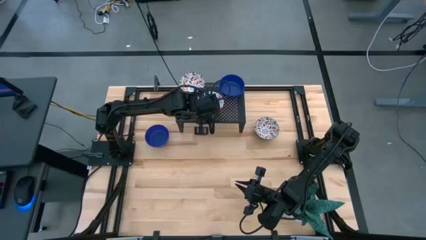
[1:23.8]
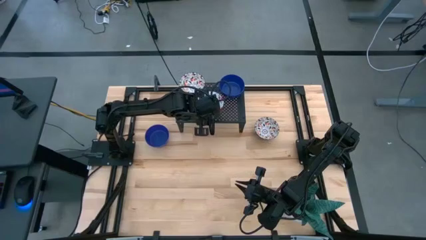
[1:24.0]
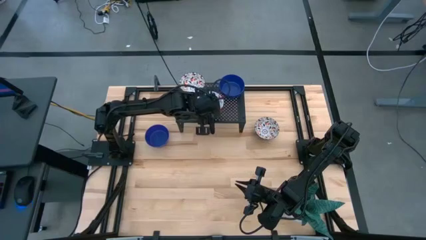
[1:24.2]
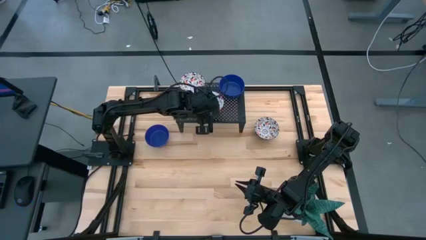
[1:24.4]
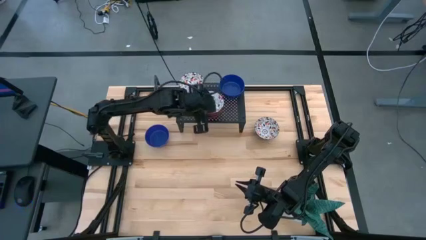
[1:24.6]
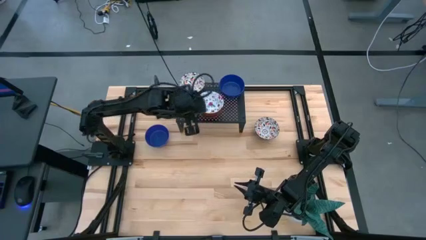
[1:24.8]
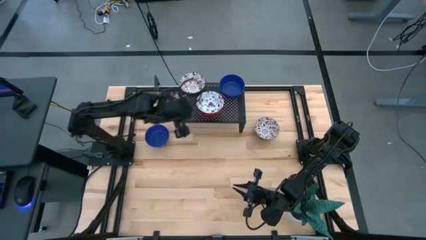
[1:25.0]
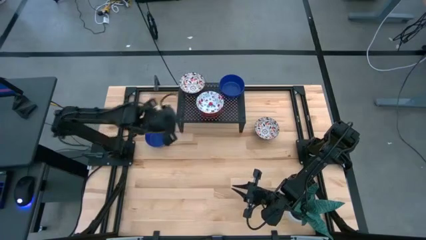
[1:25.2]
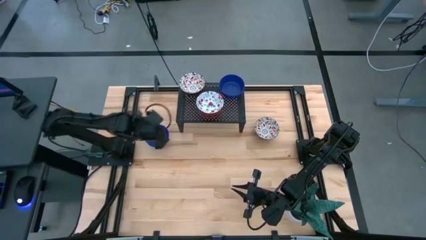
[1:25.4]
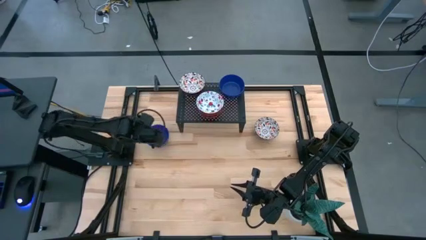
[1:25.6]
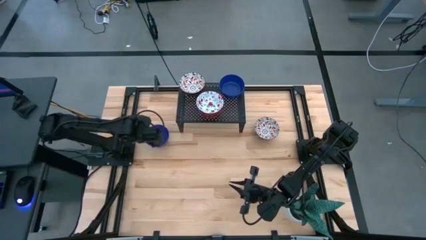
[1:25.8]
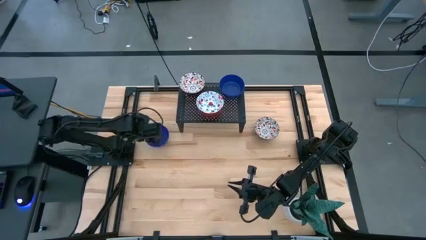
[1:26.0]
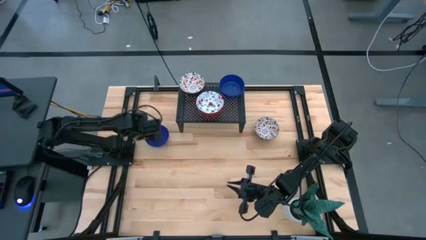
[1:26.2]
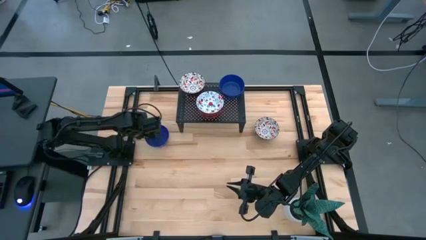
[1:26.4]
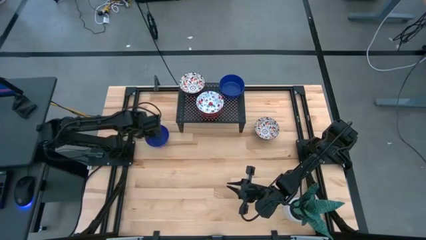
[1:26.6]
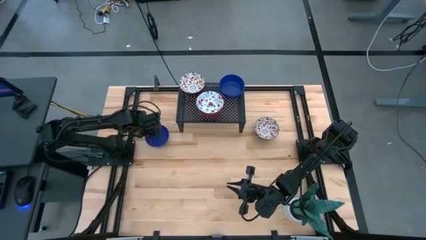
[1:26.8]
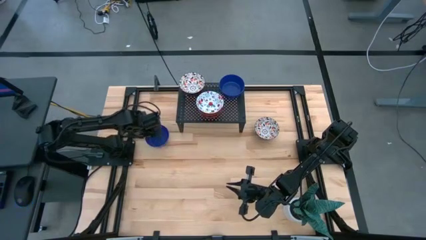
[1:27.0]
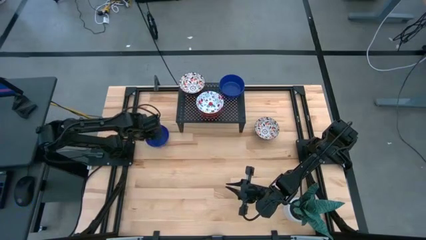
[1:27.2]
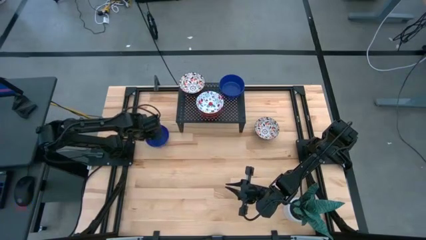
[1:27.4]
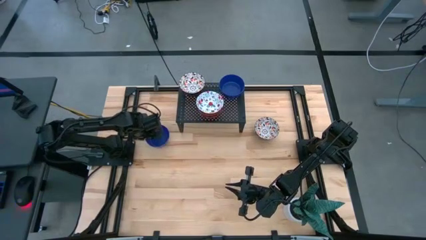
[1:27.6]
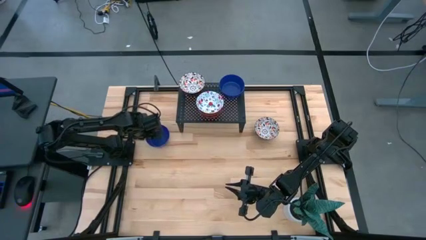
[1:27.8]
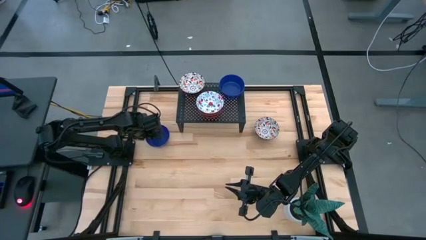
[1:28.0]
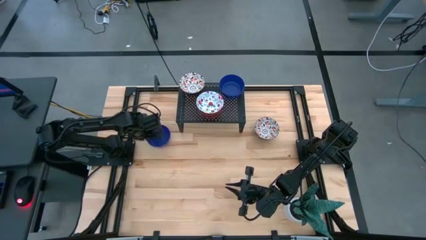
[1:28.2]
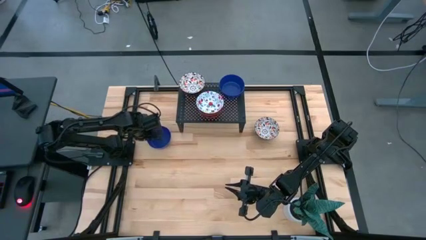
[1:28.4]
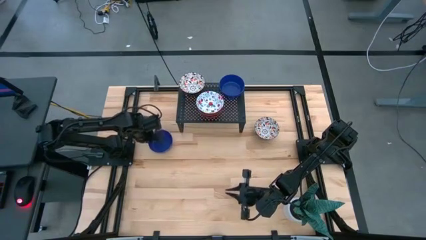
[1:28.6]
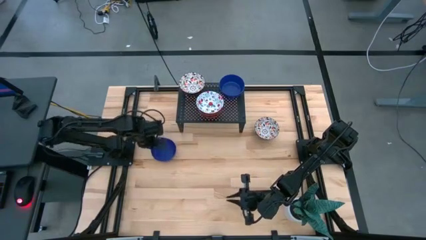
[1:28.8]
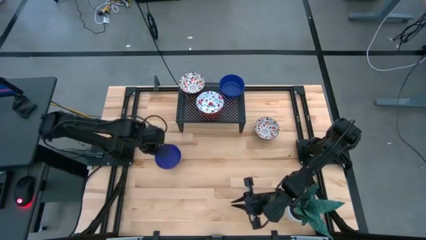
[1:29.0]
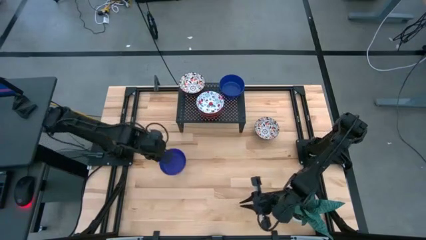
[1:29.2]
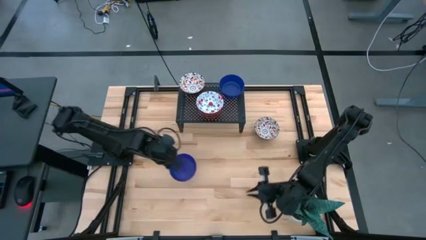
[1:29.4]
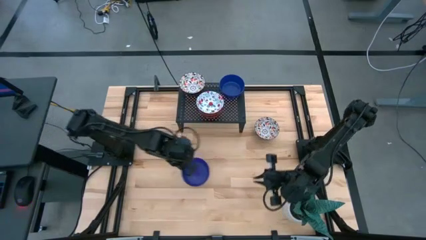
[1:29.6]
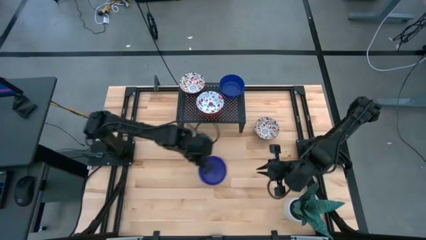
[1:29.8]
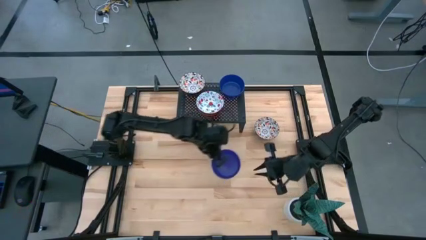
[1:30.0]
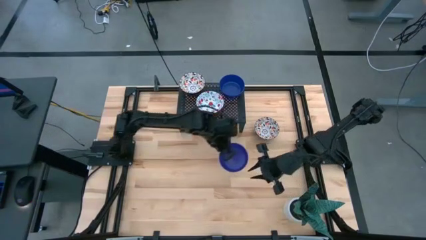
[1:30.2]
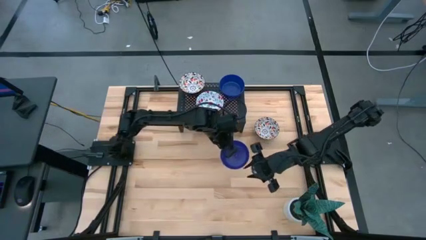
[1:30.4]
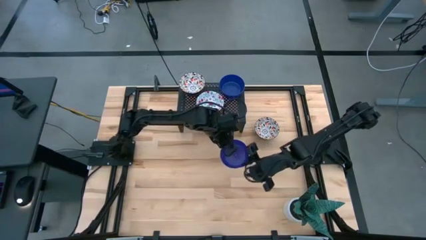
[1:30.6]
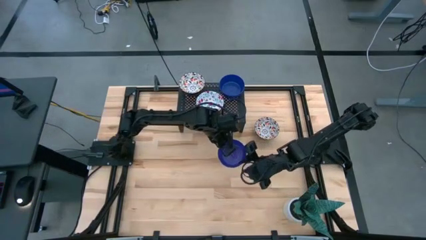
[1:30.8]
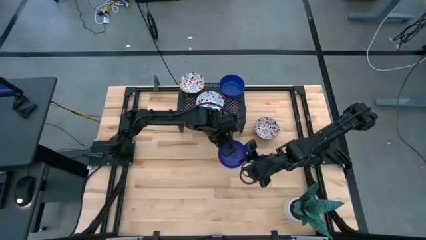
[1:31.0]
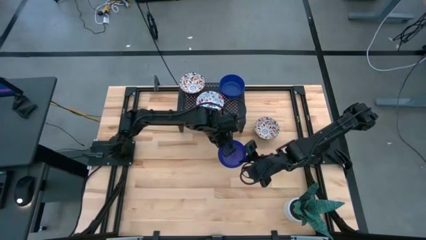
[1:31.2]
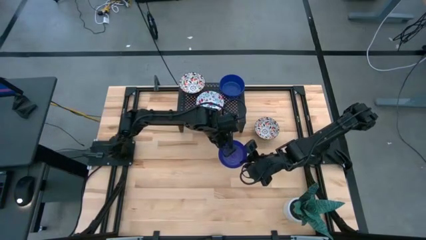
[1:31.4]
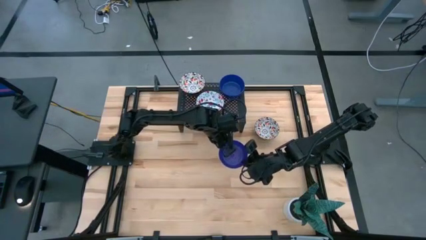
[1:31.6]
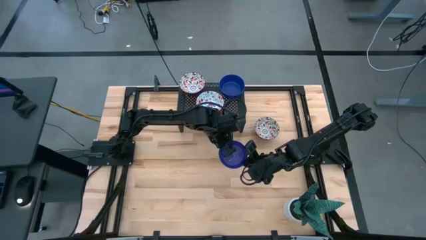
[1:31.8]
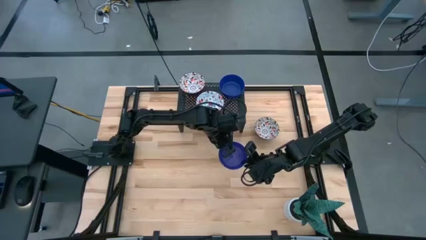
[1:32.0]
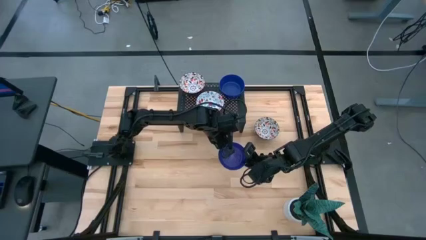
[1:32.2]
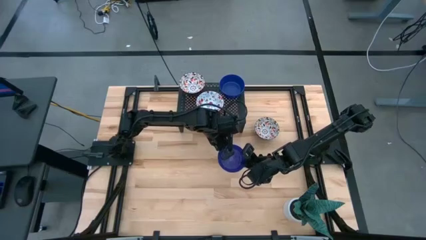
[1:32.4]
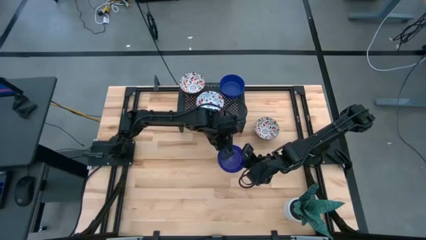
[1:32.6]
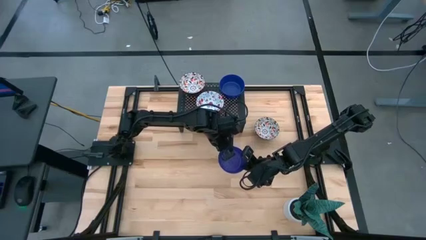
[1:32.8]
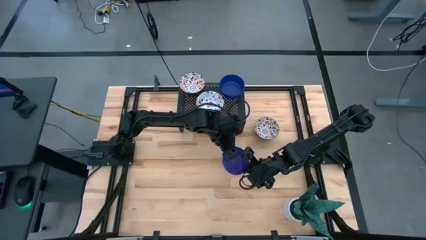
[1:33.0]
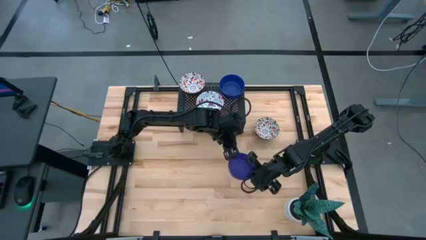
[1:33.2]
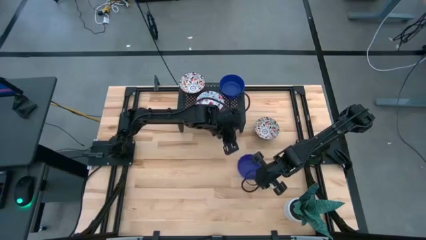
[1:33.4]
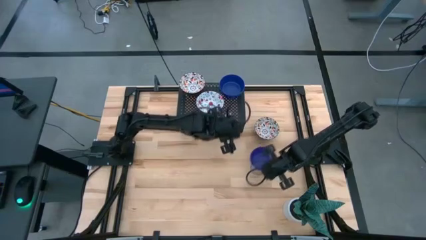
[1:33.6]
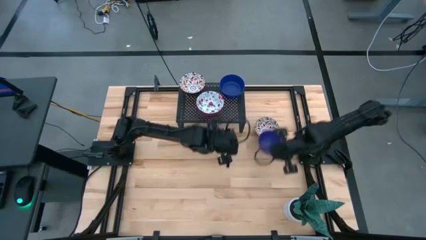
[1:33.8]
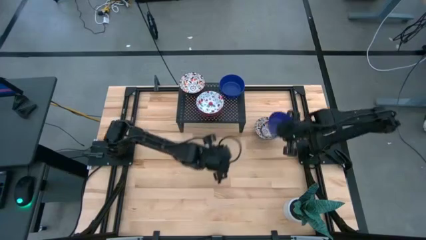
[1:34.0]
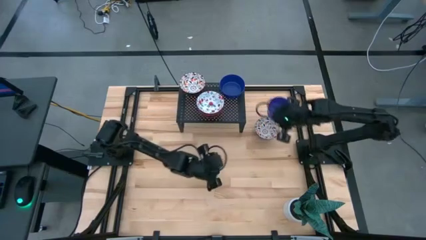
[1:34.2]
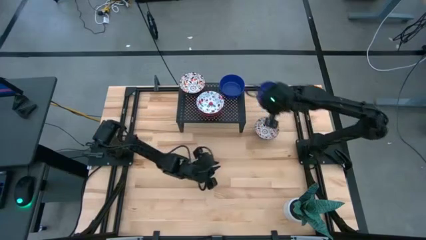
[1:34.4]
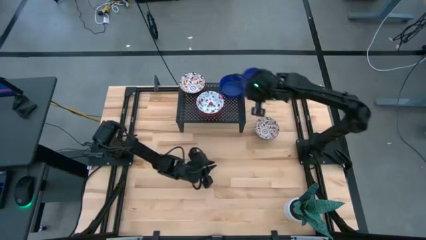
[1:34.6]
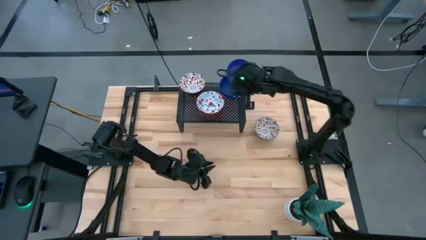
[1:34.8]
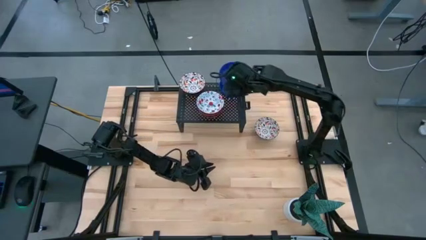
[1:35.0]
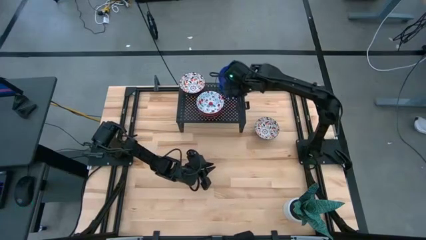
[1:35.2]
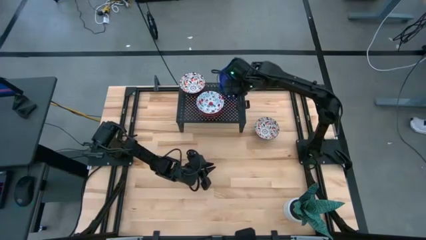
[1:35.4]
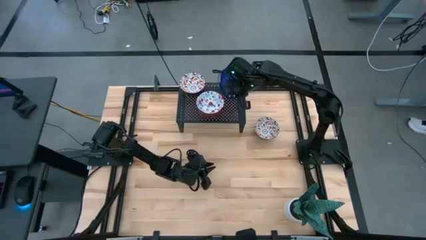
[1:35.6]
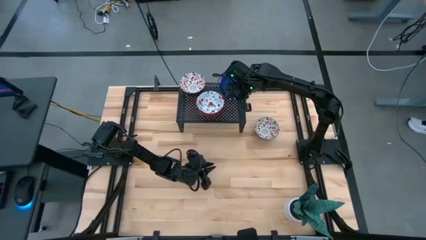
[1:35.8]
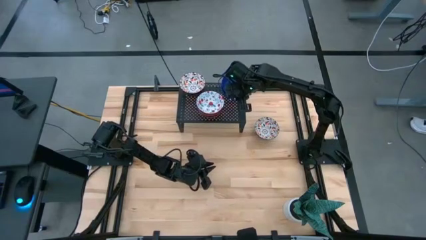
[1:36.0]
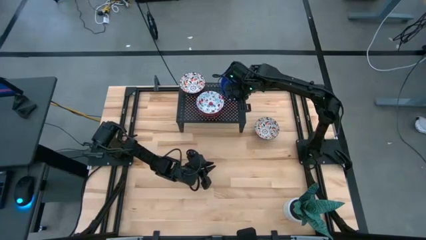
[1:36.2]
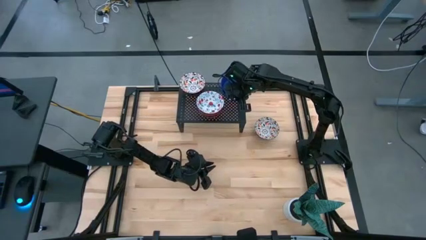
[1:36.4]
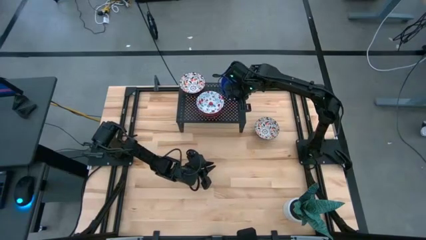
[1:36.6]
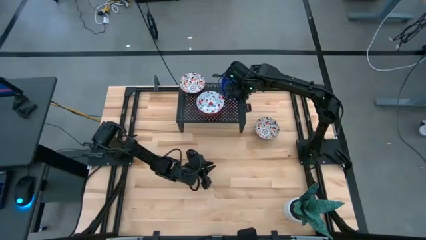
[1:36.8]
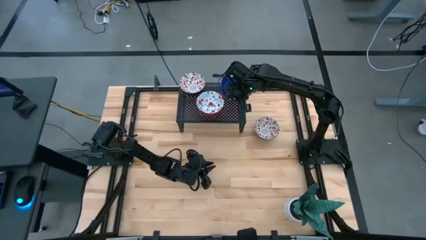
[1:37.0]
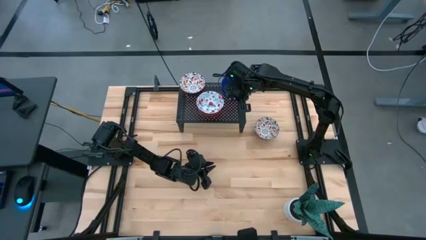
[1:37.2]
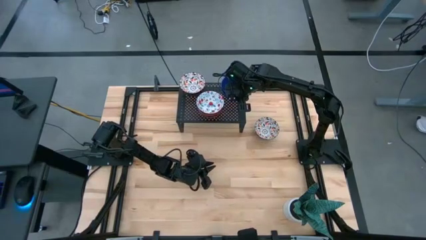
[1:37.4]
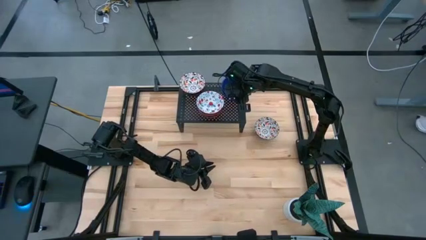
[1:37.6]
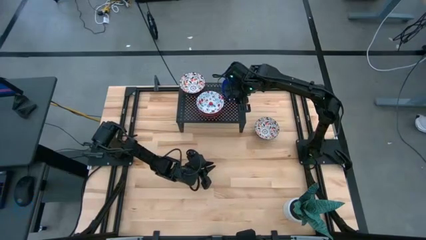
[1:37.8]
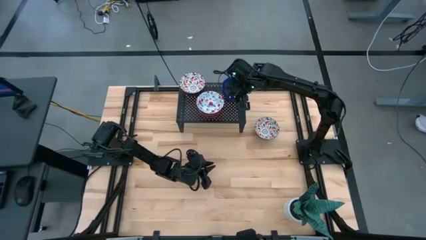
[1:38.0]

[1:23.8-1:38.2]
Task: Pick & Place Mini bowls
Stack the blue bowl on the blue bowl on the shelf

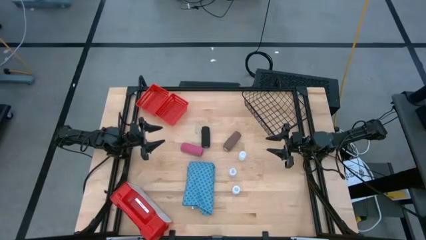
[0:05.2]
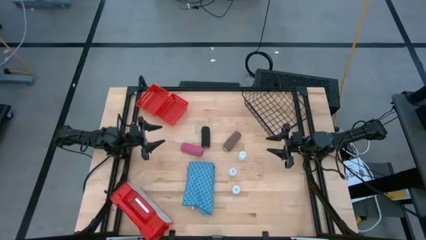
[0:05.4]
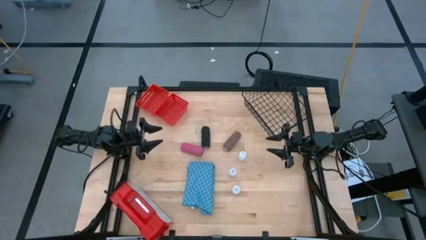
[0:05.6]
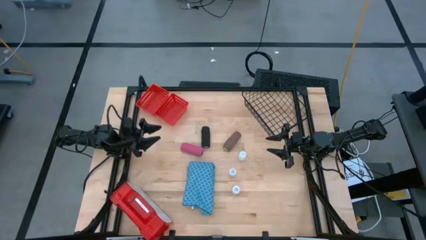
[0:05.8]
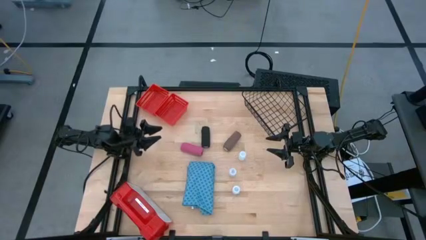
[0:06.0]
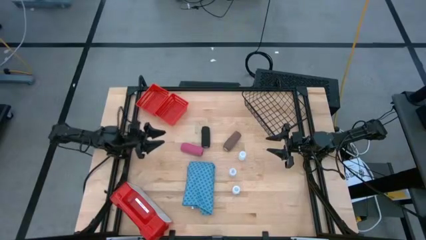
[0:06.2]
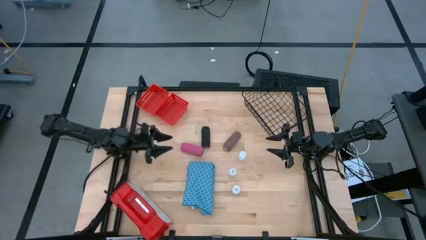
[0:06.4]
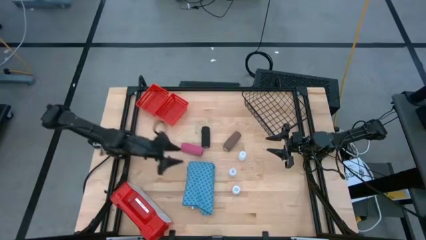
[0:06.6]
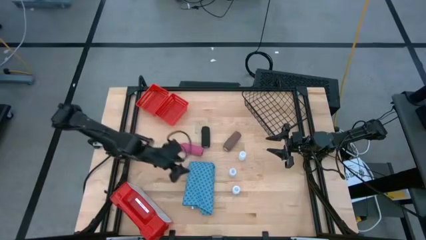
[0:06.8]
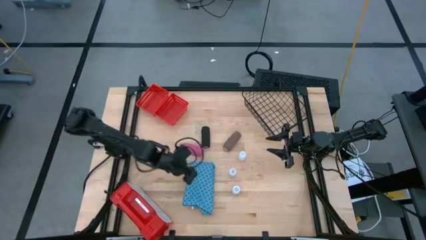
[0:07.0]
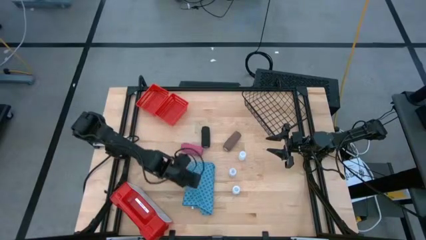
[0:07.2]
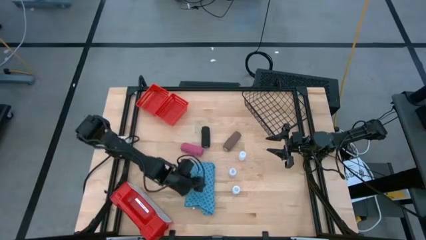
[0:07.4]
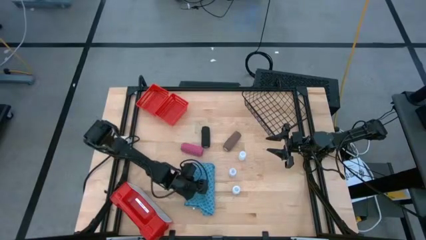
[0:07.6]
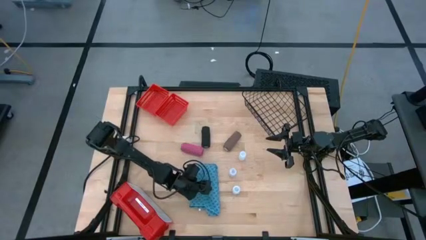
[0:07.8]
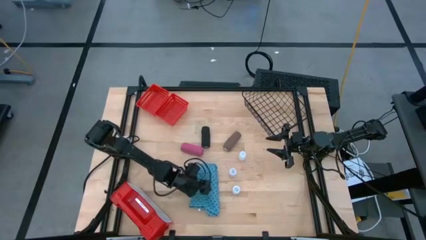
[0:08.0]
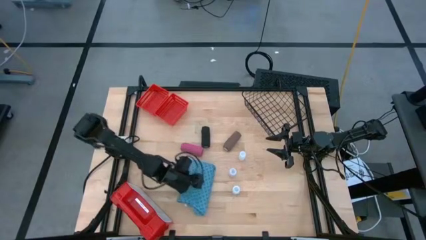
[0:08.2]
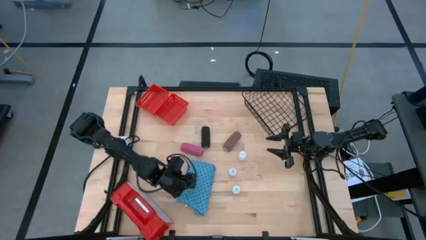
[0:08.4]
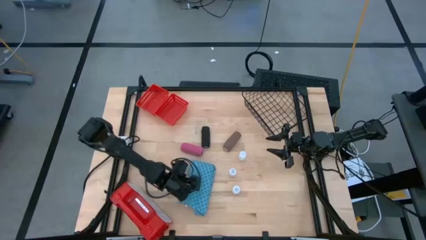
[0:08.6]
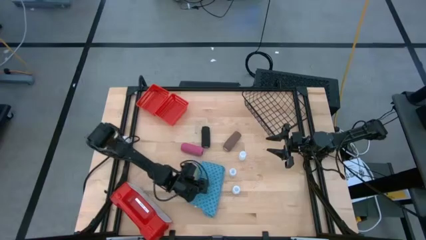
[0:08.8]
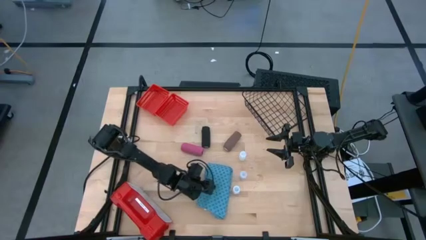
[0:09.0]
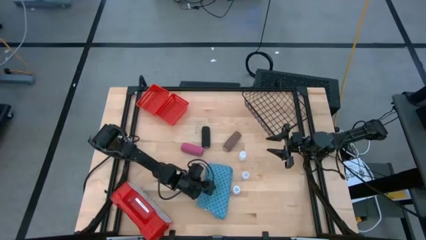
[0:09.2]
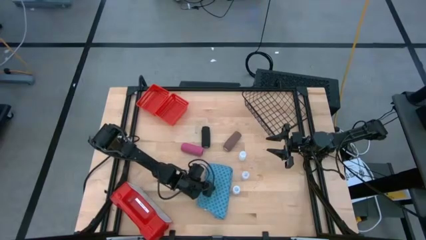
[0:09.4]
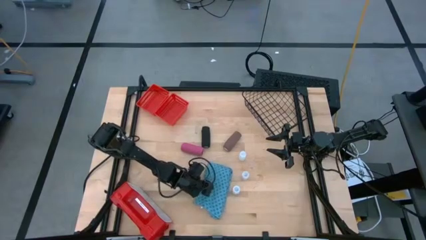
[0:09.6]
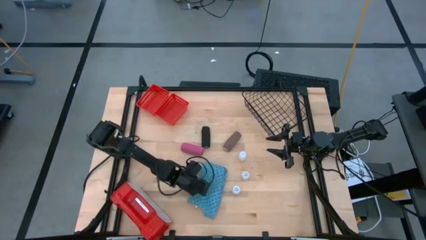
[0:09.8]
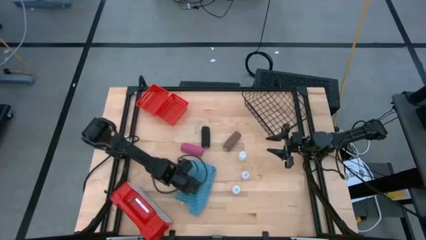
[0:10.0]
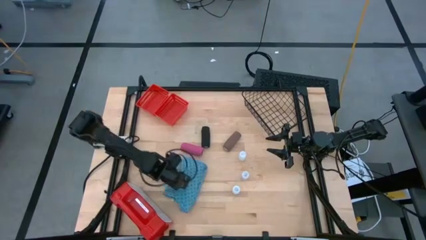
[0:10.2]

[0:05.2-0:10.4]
Task: Pick & place medical supplies in basket/bin
Put the blue patient gown into the wire basket
